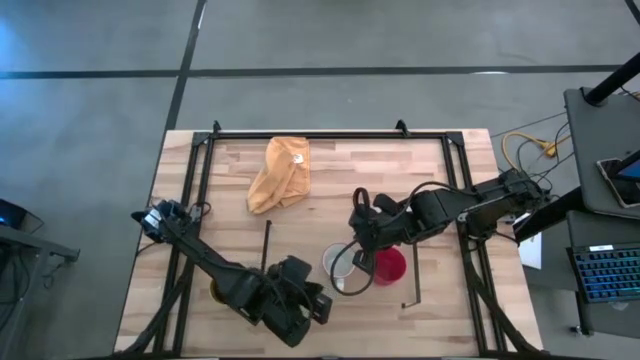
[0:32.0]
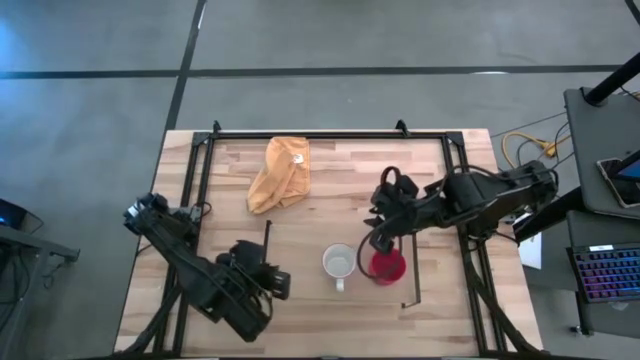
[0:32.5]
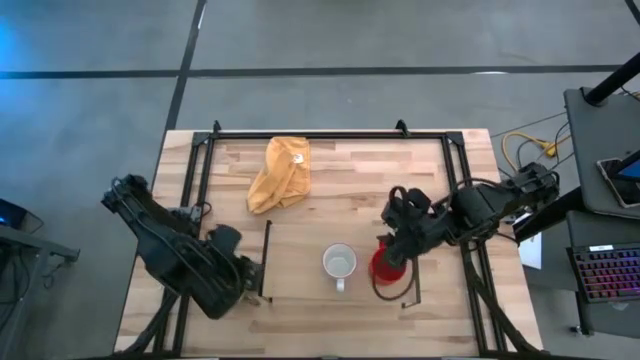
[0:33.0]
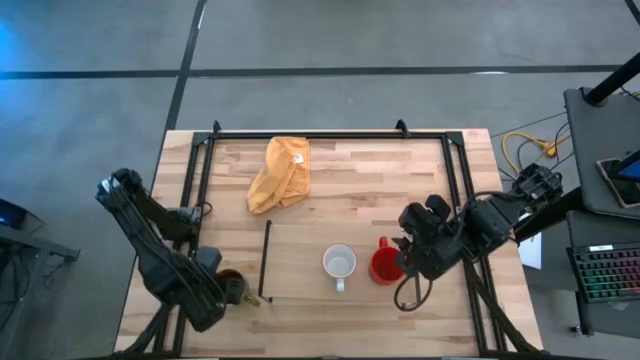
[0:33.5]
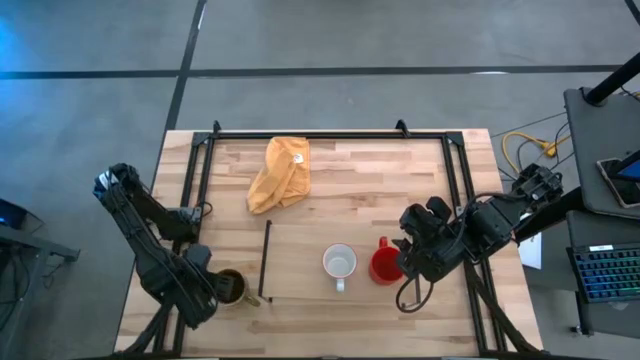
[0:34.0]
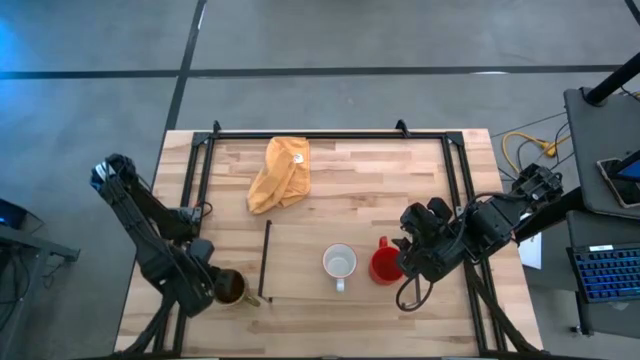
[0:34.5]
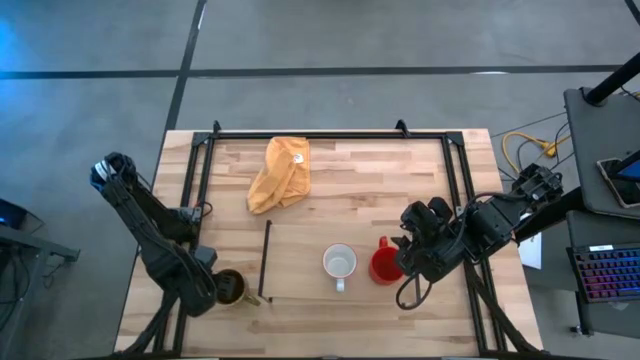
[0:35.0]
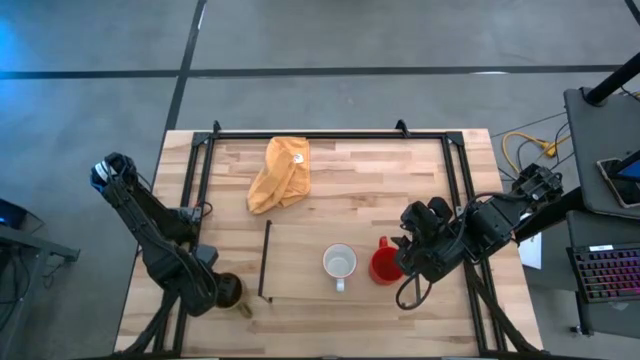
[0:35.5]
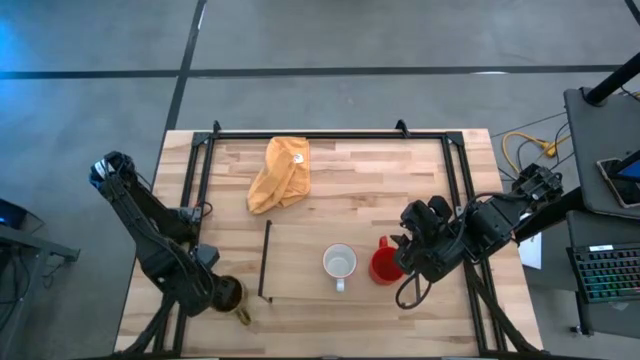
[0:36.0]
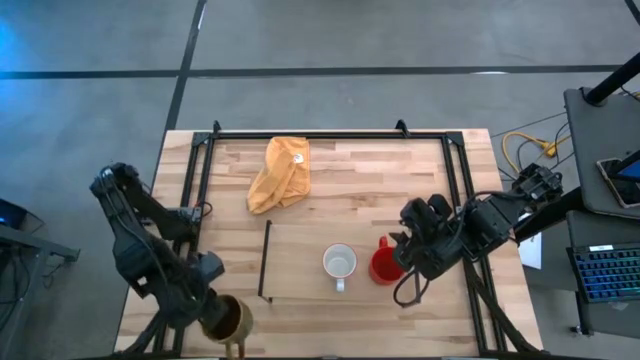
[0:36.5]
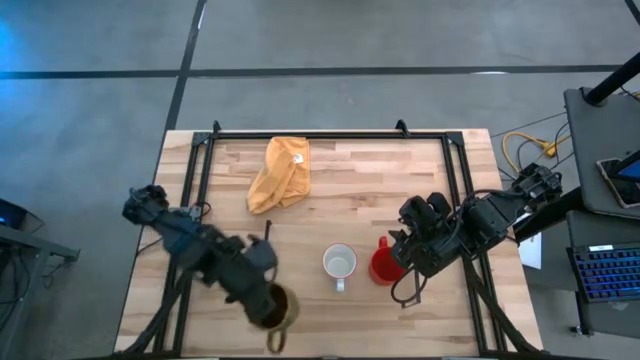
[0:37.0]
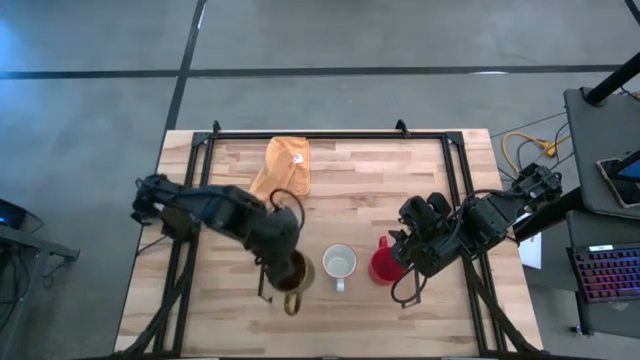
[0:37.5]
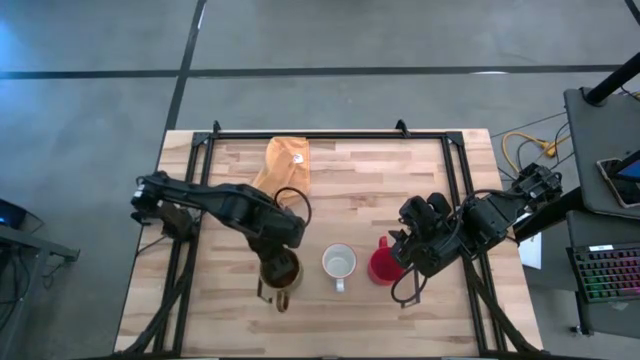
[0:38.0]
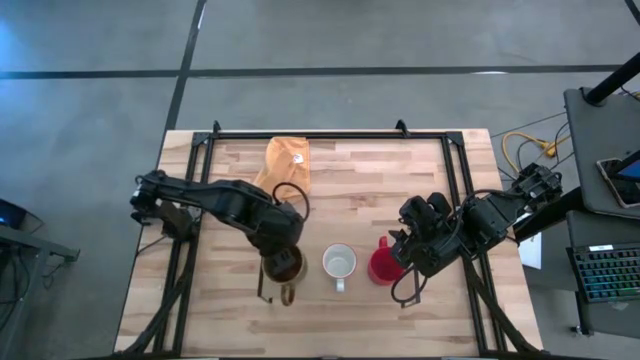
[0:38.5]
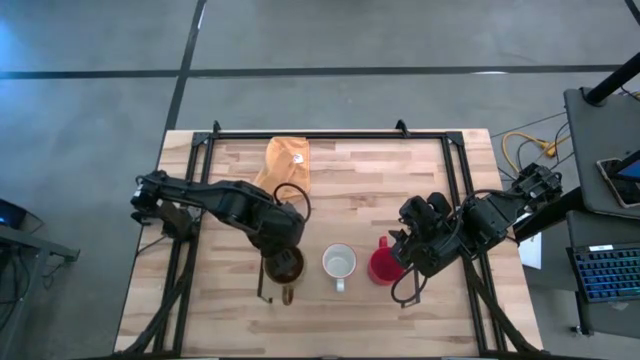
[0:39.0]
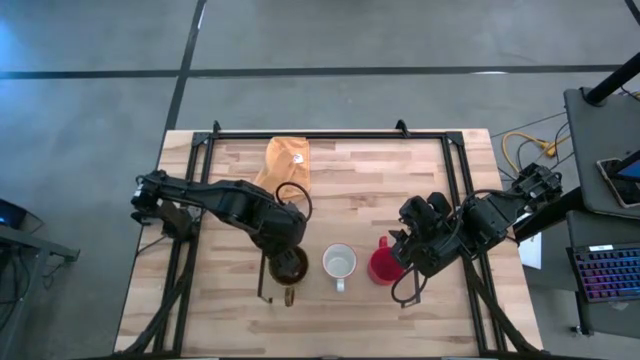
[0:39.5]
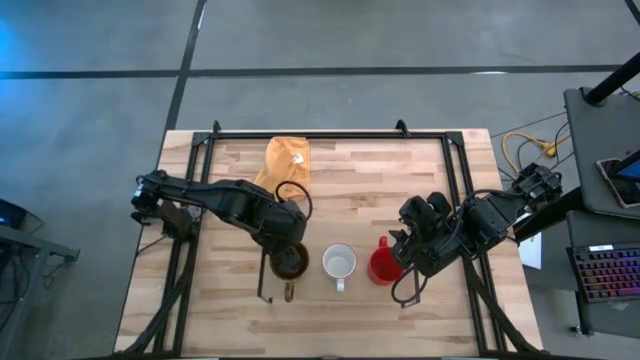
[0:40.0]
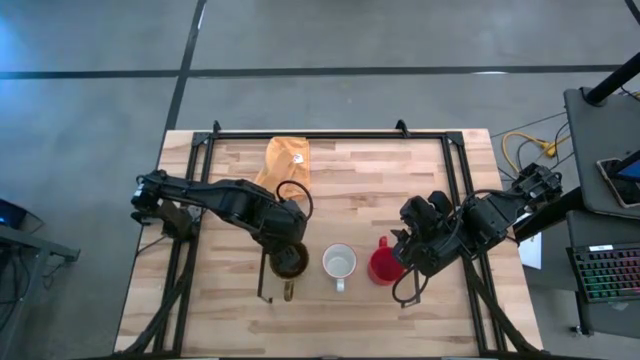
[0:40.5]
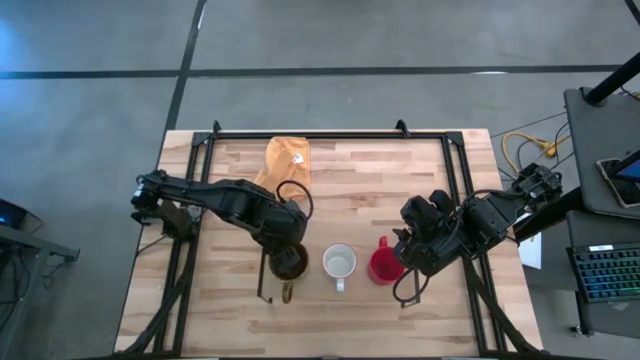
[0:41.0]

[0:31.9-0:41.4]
Task: Stack small to large cups/mugs on shelf
Put the brown mug on the shelf

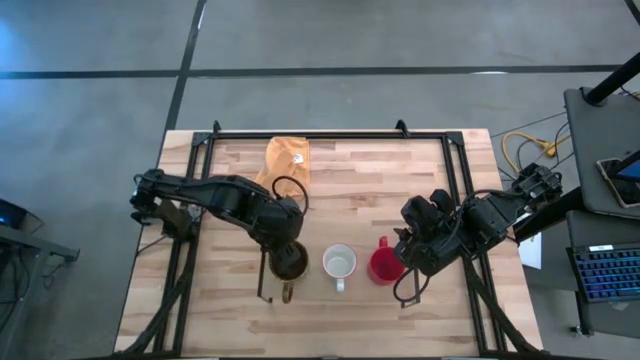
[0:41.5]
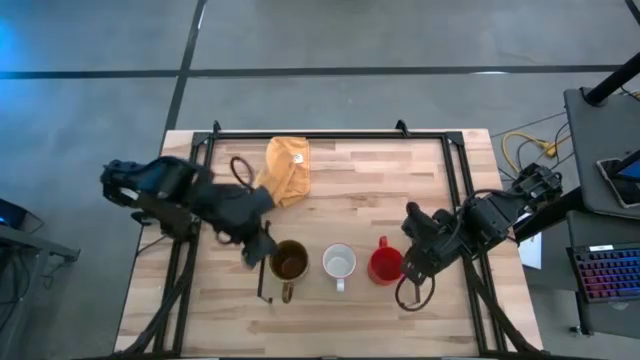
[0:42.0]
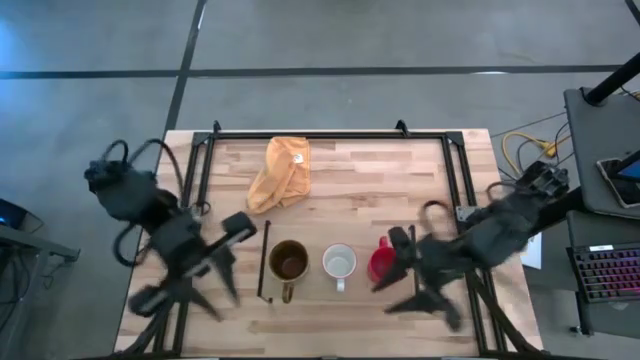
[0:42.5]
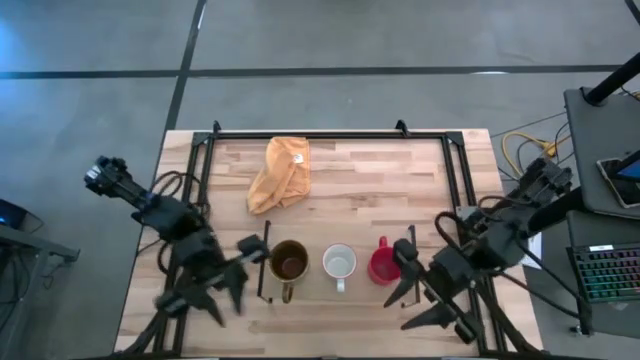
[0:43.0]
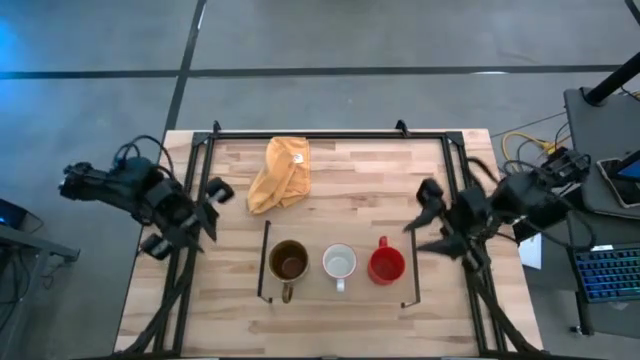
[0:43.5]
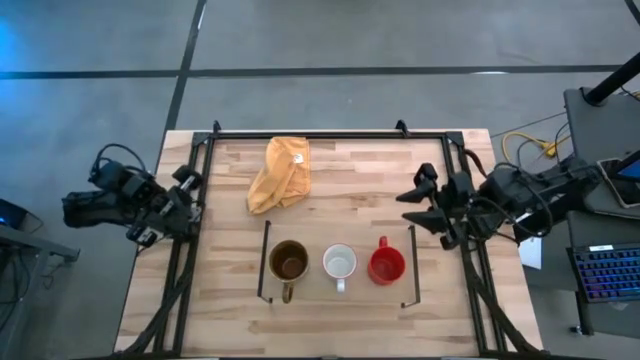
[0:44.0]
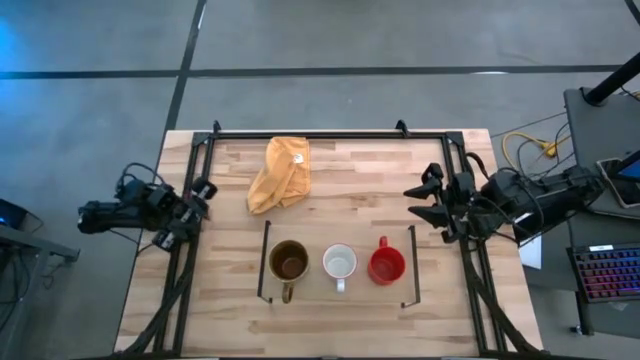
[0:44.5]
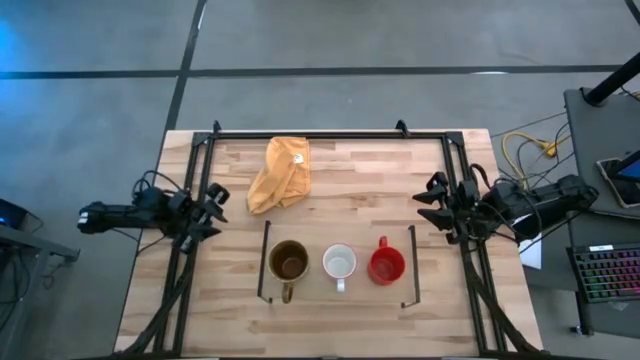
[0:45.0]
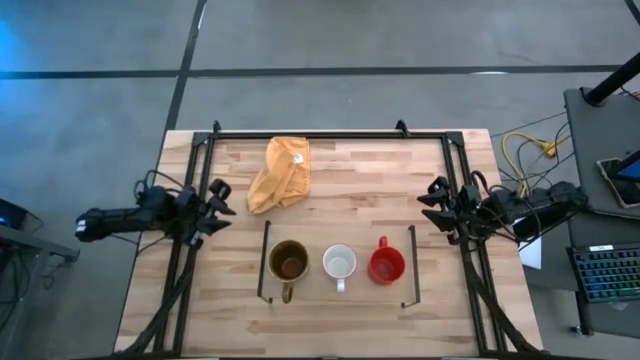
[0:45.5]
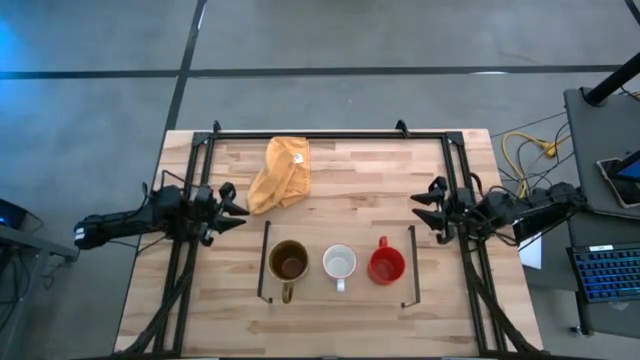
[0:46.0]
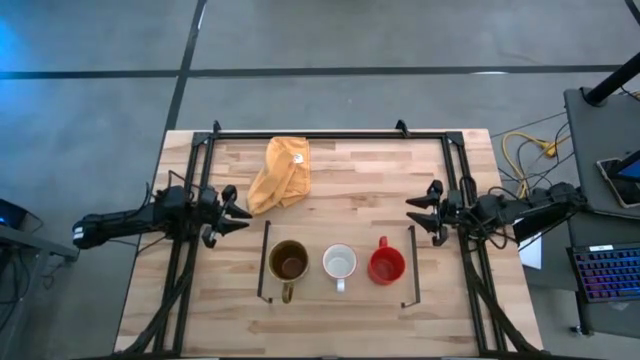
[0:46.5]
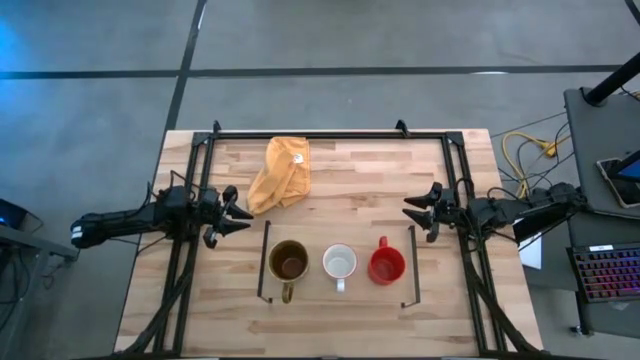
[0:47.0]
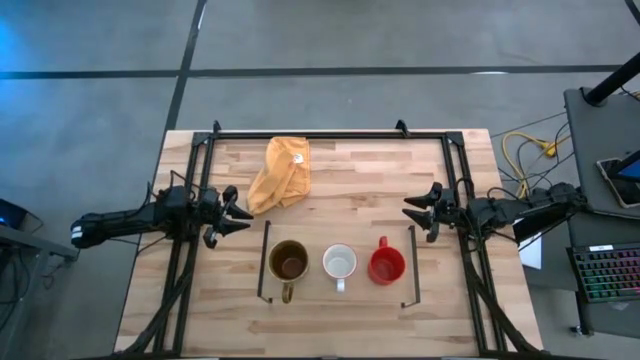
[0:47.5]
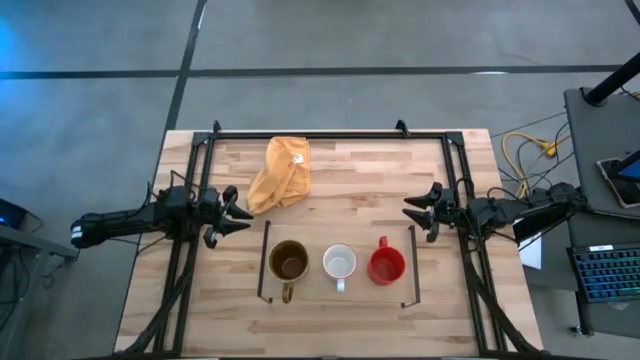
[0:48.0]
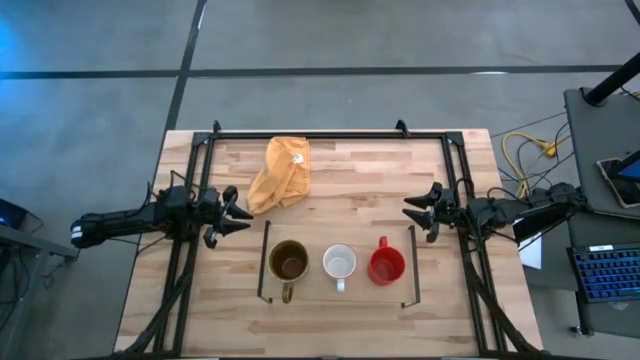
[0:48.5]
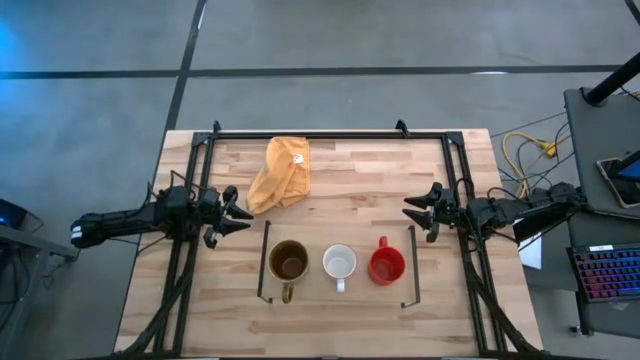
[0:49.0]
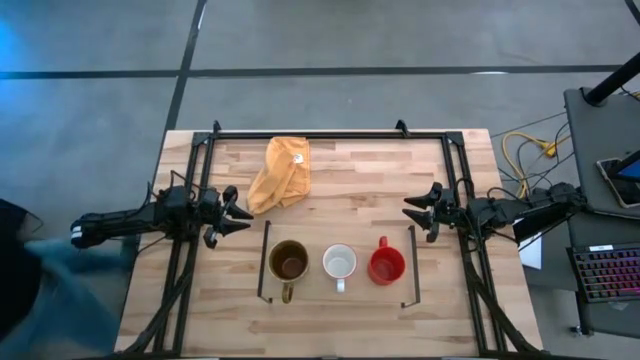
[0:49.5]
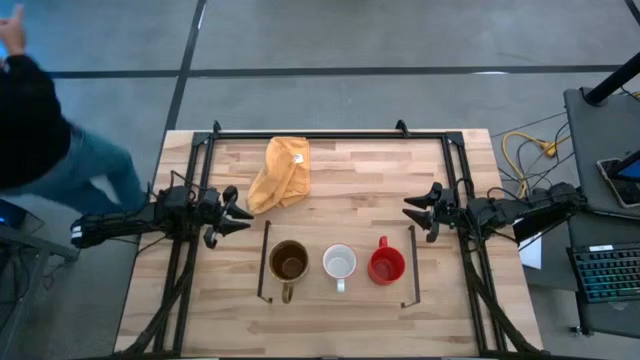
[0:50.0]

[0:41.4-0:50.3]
Return to Home Position

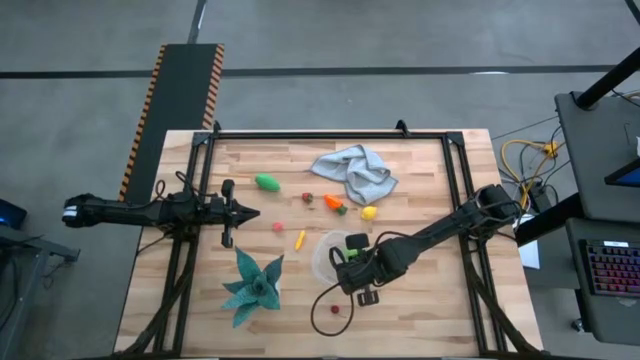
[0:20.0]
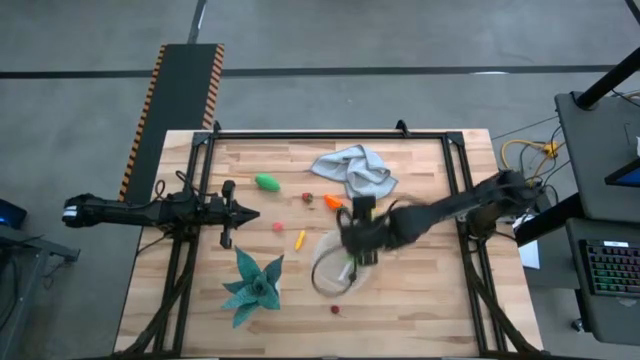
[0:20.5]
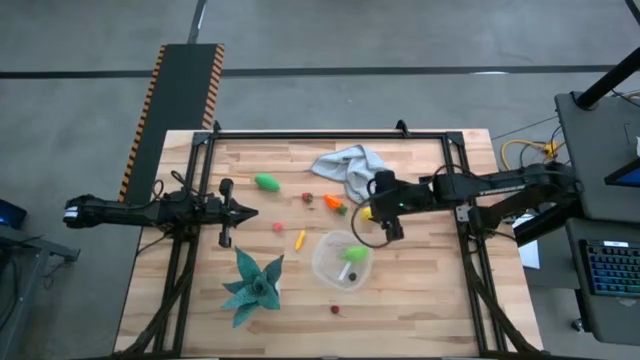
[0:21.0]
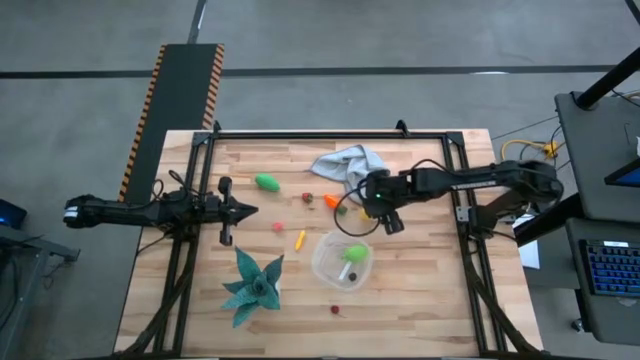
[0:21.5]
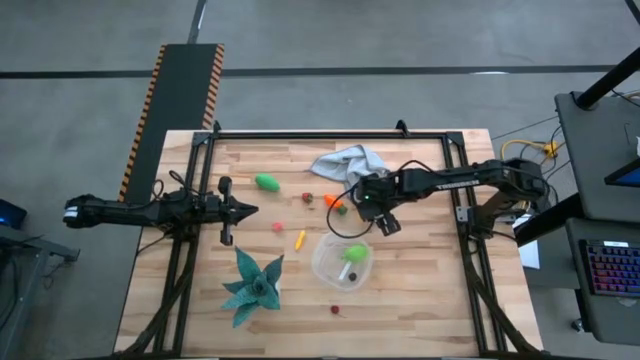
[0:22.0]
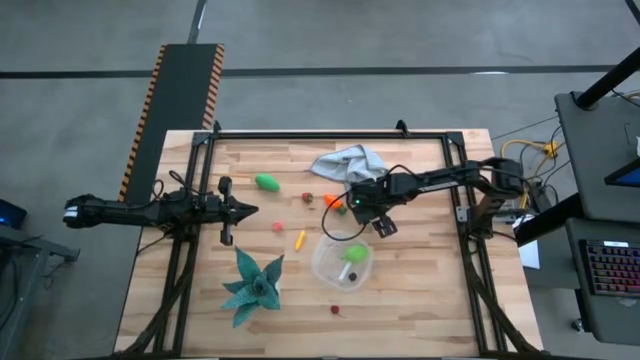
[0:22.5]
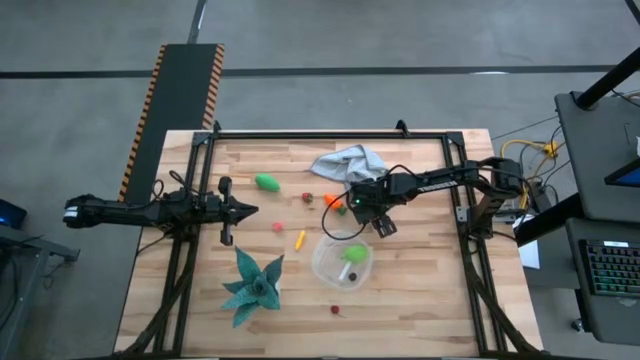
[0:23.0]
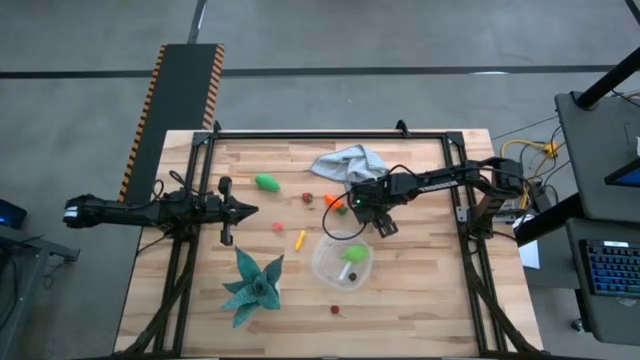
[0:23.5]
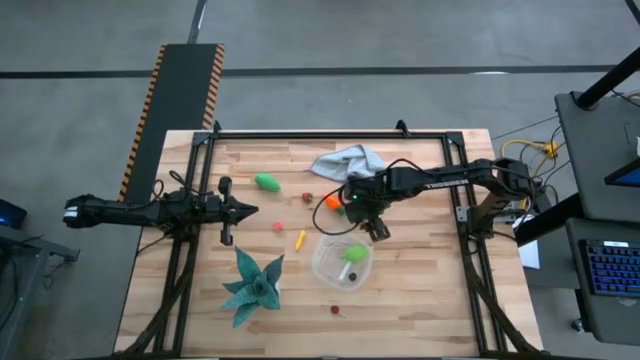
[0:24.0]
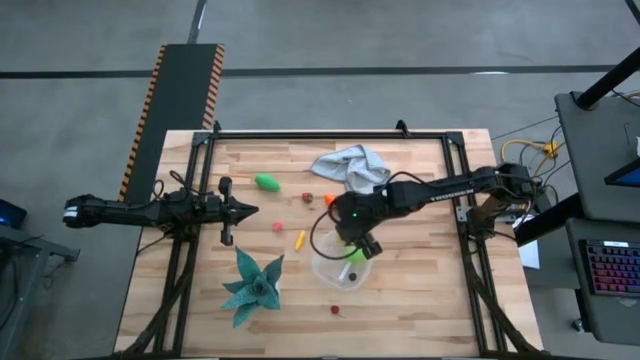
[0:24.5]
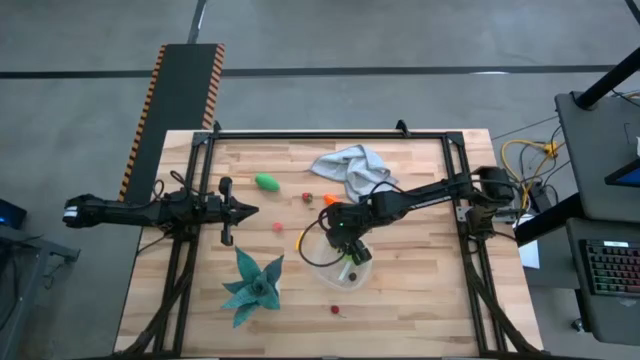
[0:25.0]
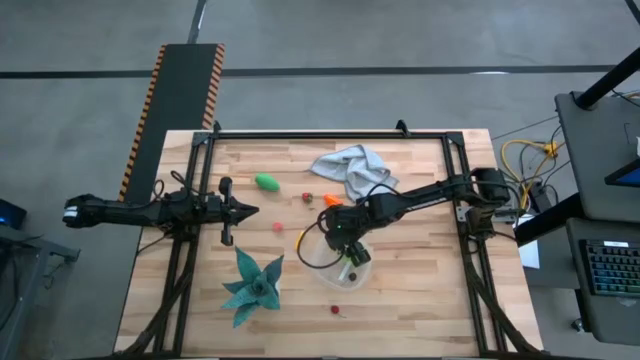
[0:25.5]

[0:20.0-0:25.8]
Task: Pick and placing Produce into tupperware
Put the lemon into the container
